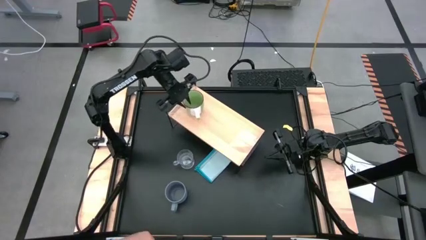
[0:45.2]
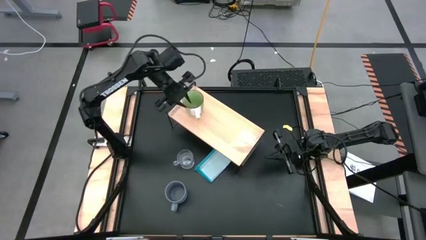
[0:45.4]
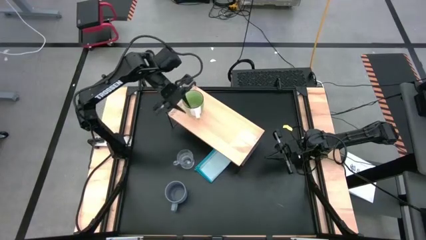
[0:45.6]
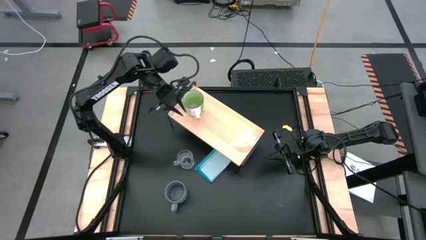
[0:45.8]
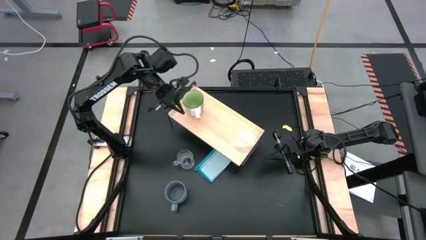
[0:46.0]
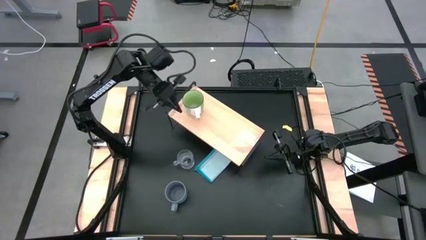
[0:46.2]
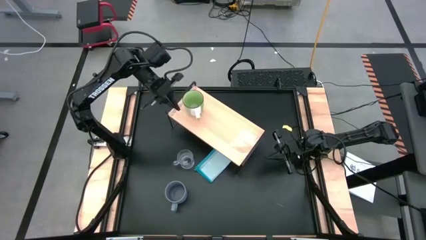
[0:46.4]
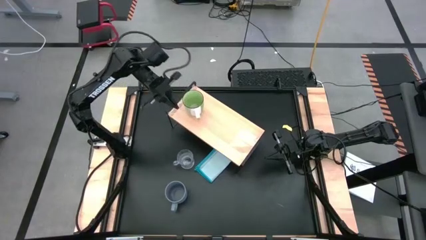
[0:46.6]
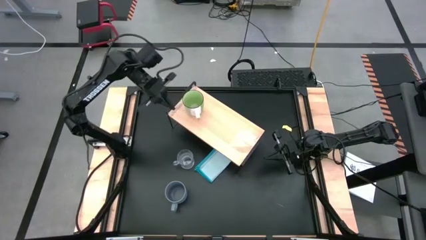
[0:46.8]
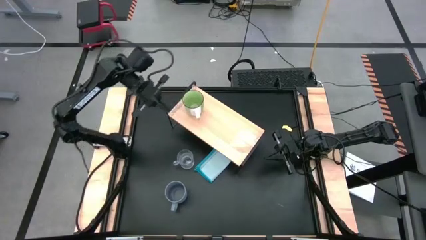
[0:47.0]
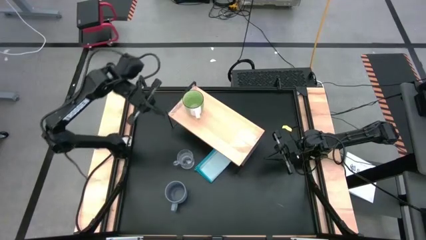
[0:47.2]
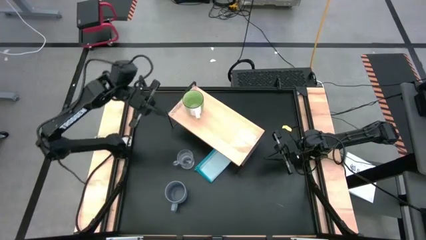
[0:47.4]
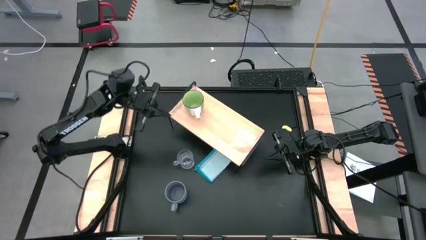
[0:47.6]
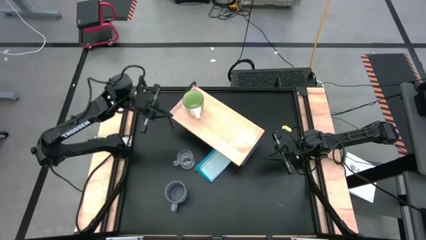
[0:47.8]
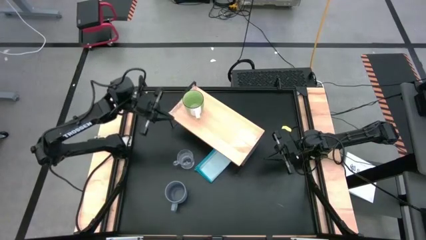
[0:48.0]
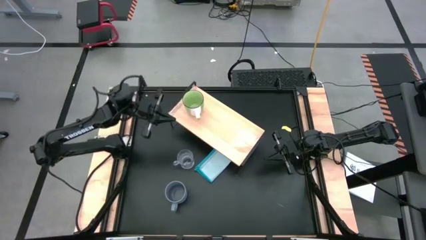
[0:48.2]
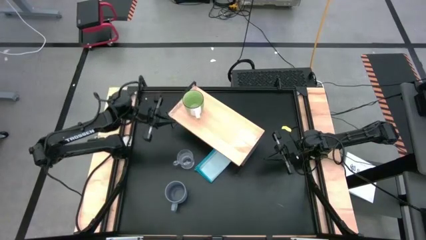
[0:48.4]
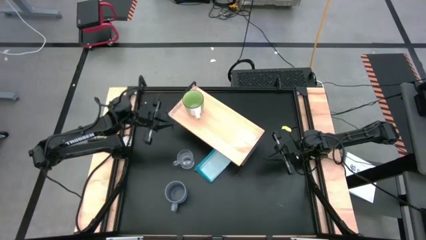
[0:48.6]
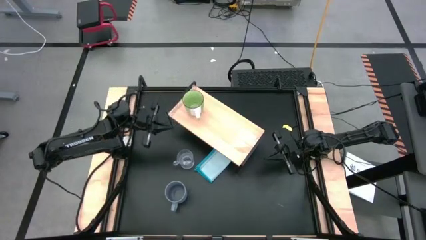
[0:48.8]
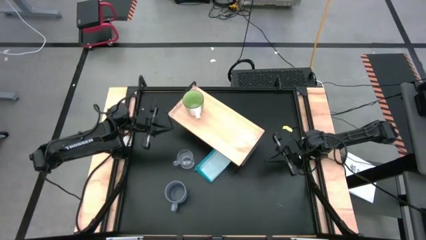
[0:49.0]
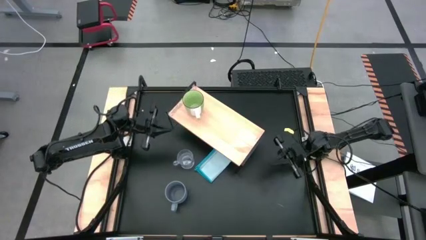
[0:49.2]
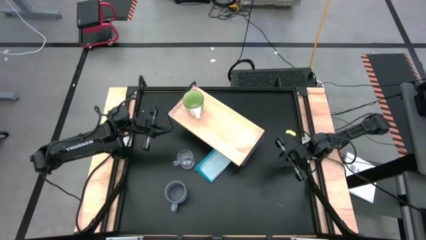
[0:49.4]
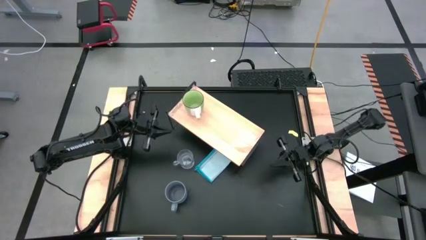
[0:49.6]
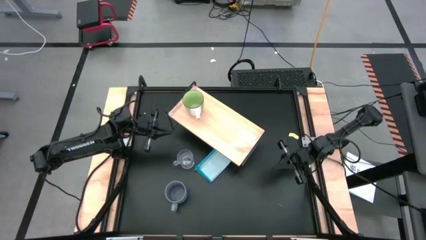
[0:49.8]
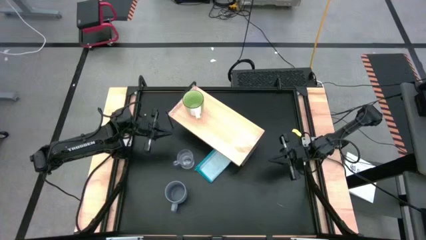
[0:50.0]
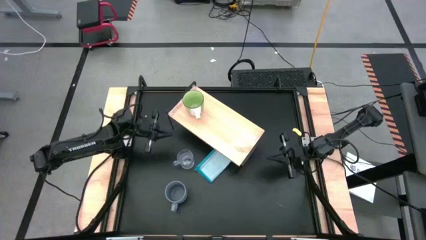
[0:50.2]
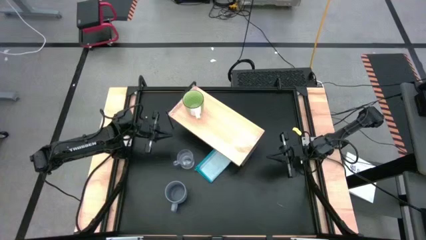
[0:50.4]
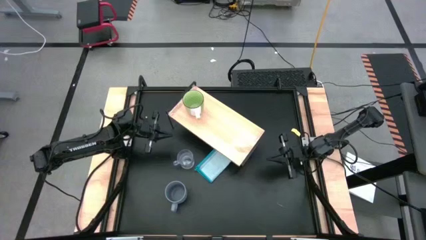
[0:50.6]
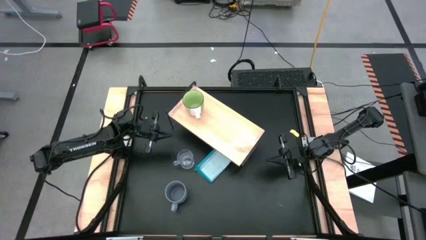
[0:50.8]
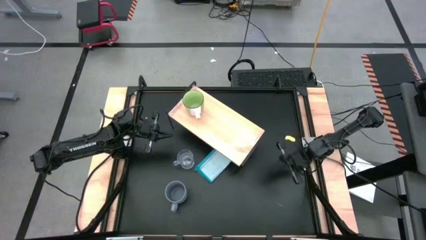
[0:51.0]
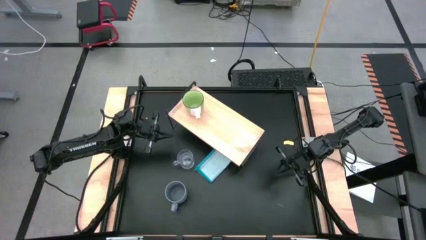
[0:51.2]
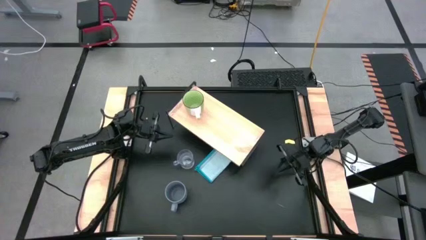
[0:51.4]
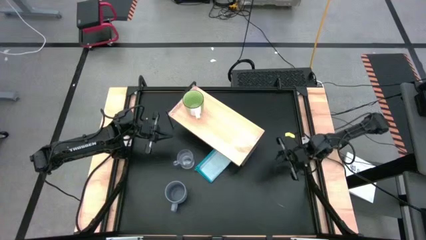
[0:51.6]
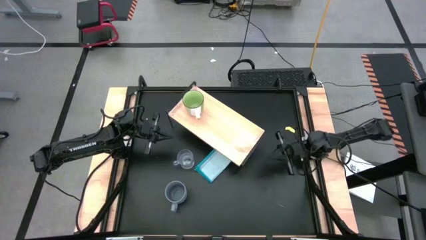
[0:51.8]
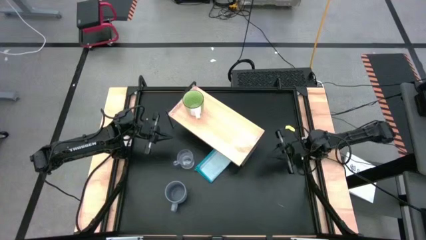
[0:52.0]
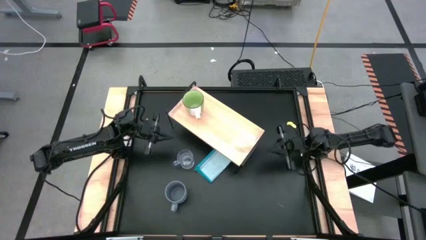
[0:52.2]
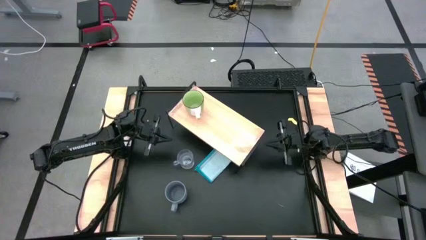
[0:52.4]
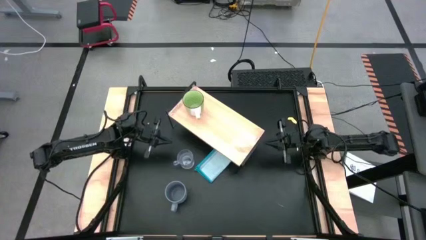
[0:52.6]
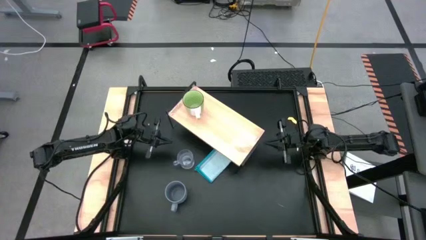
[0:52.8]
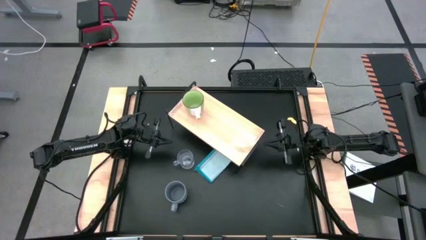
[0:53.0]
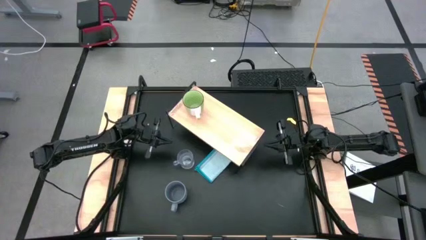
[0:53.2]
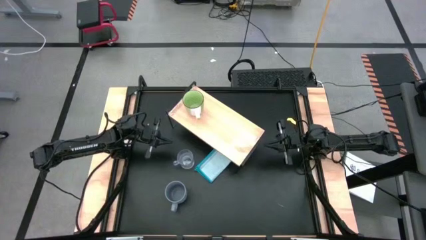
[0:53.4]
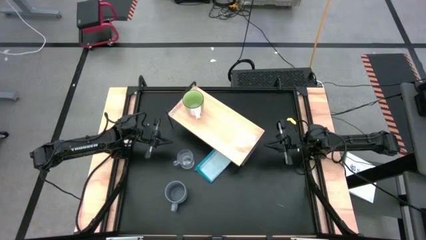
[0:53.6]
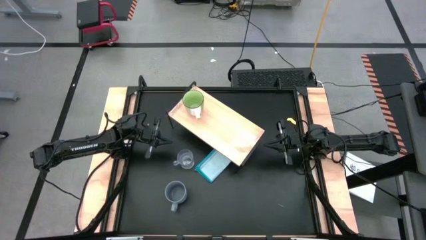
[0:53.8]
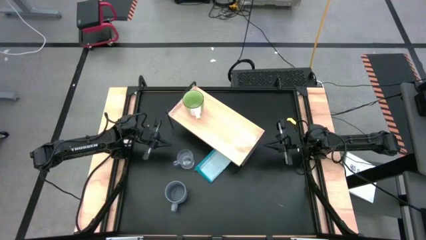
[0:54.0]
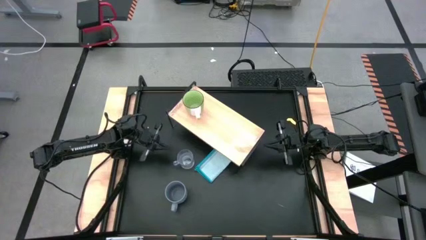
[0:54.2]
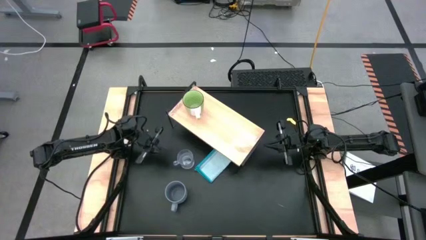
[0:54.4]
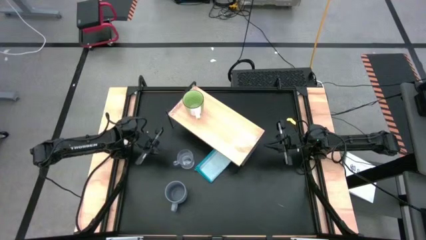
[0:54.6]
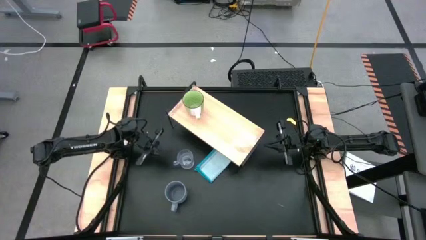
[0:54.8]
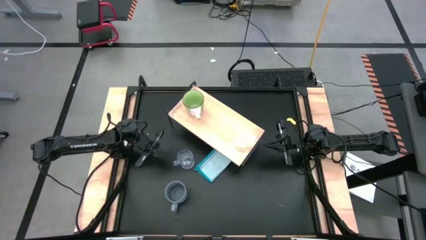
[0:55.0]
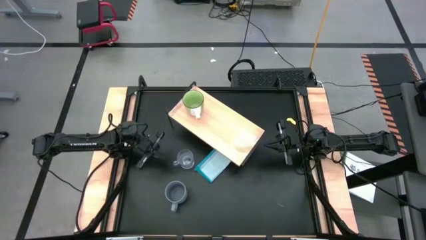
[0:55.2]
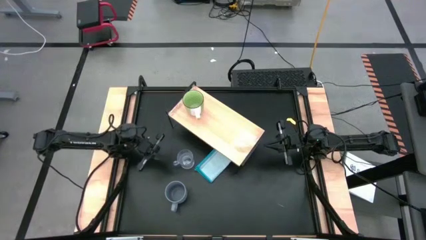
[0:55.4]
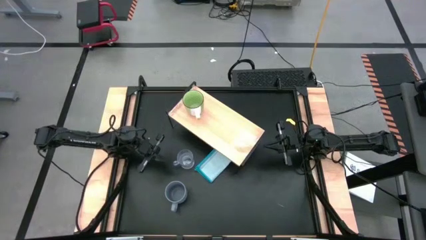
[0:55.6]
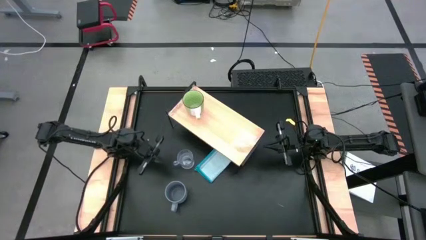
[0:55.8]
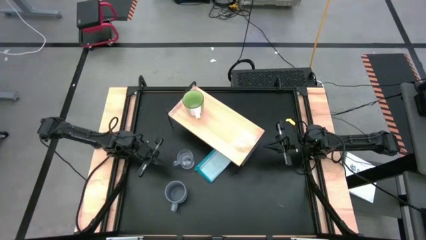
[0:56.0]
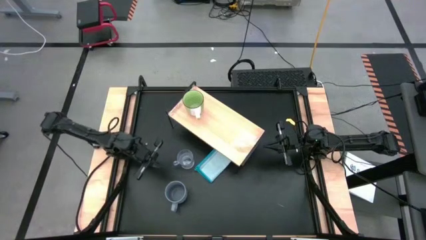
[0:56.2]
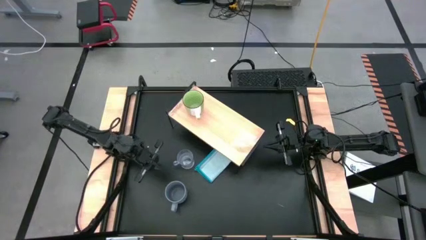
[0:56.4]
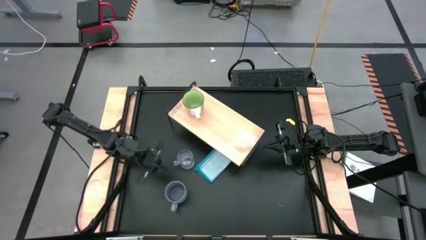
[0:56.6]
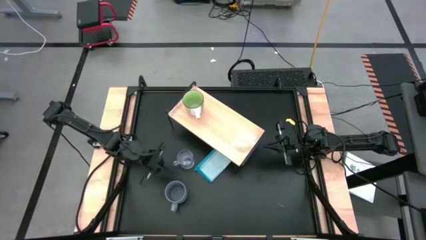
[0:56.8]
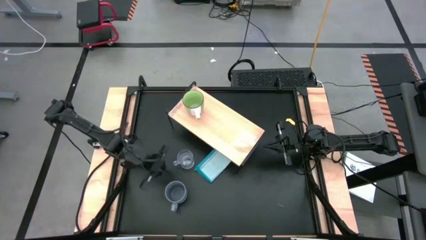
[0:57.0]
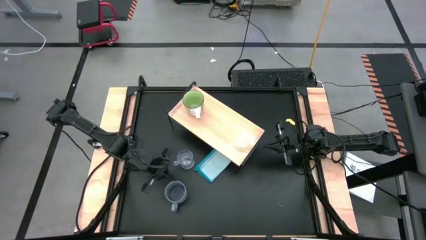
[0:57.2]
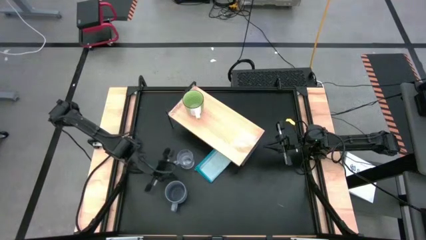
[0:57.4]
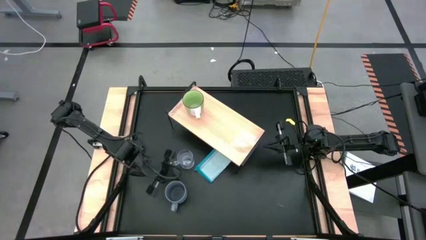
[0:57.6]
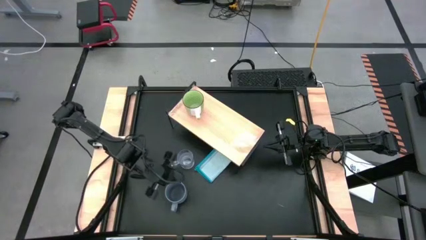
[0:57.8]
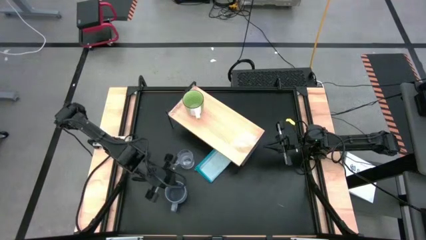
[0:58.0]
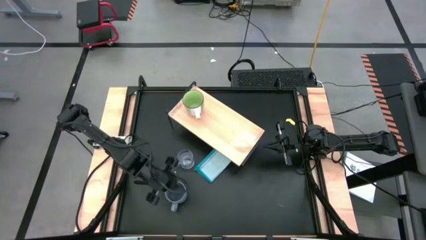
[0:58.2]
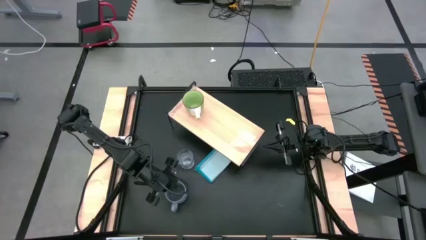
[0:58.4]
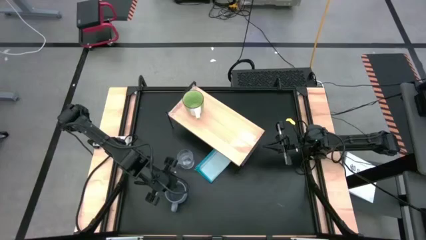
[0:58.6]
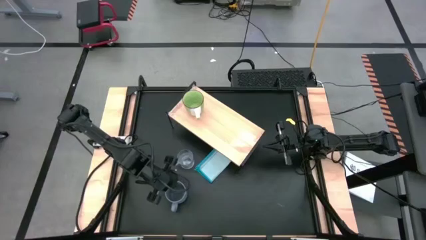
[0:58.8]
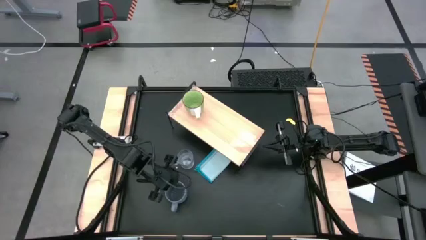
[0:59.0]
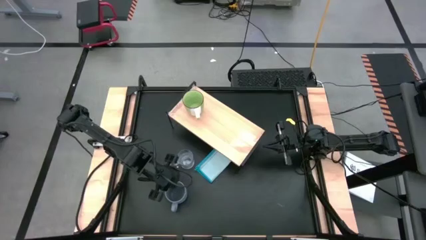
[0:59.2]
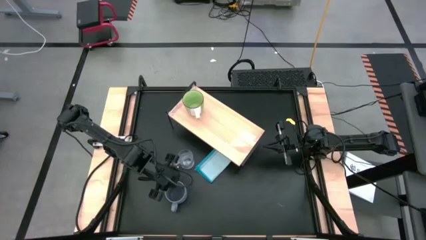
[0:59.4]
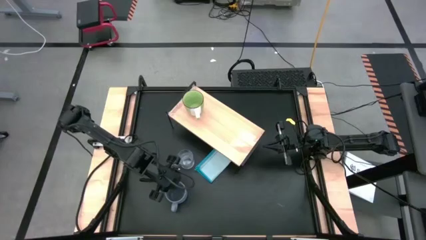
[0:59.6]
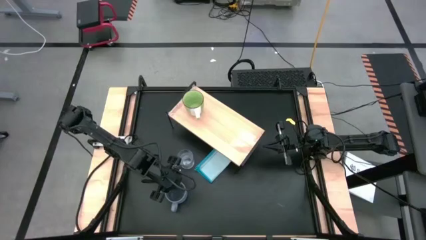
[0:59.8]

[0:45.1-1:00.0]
Task: Stack small to large cups/mugs on shelf
Put the blue mug on the shelf

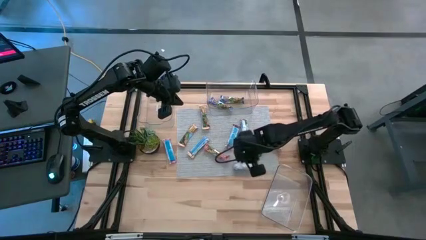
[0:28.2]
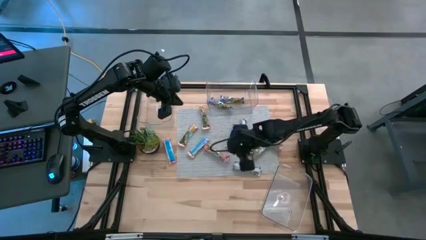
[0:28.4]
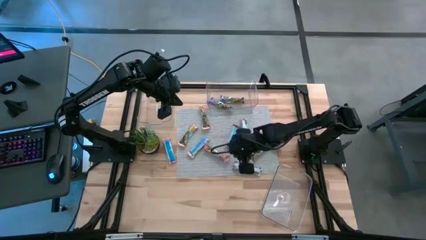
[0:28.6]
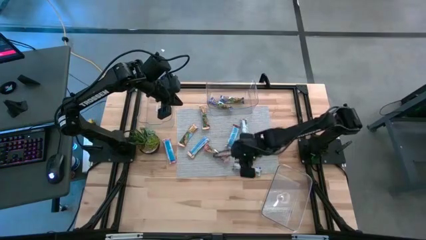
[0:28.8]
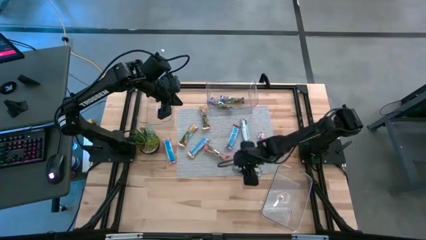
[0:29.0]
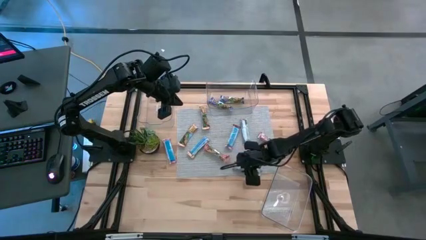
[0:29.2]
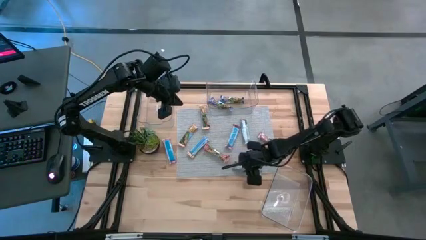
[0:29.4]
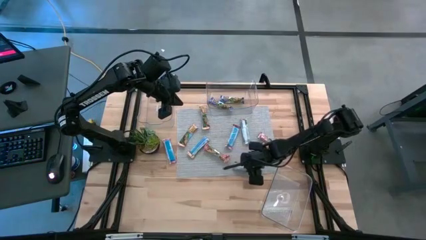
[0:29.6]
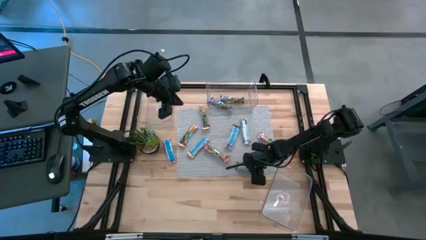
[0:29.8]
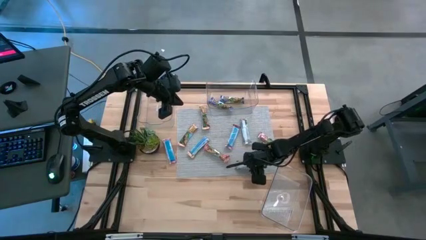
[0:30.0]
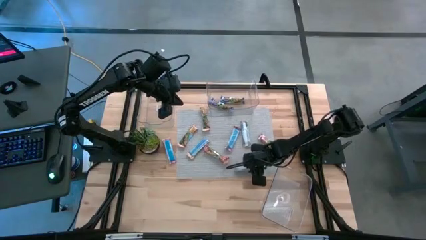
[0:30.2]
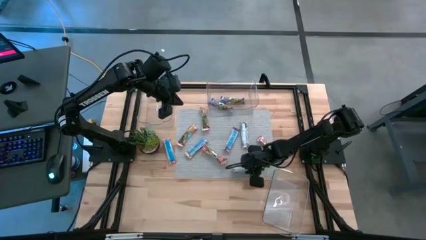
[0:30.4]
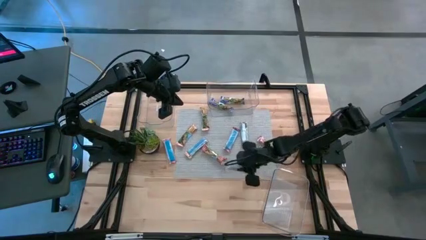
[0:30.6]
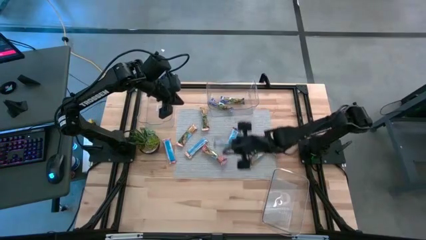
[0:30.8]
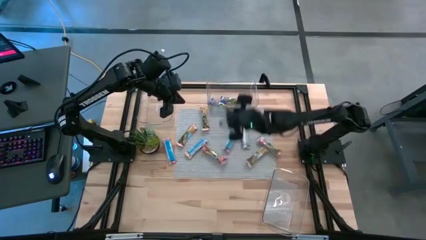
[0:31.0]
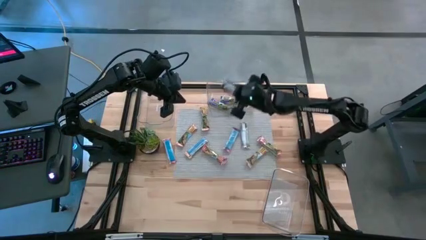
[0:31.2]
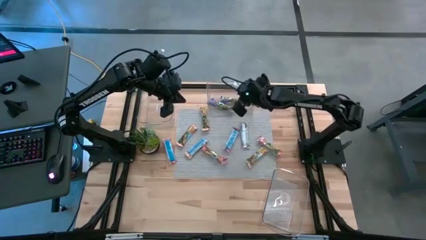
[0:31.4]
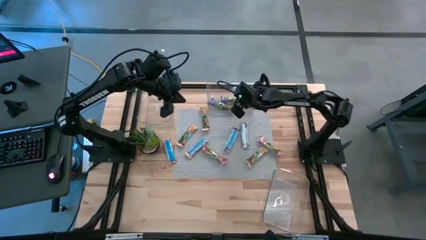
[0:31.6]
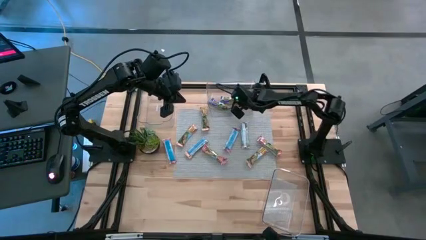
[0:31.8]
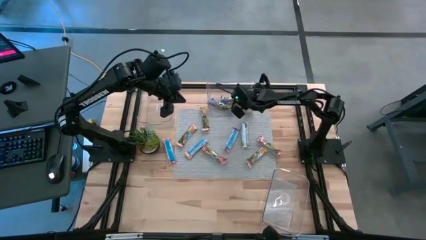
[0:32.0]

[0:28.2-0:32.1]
Task: Pick and place Granola Bars by type
Put the blue granola bar into the right transparent bin
